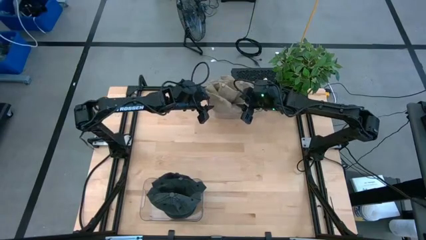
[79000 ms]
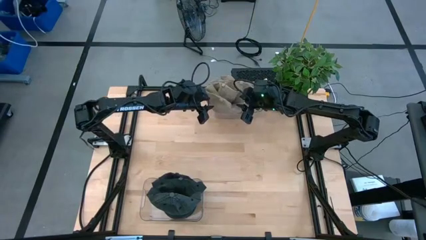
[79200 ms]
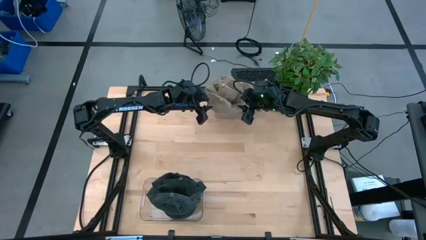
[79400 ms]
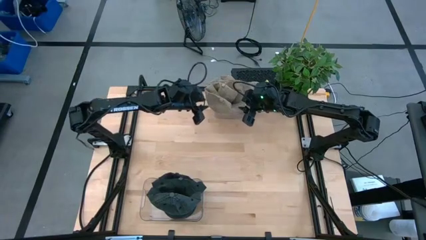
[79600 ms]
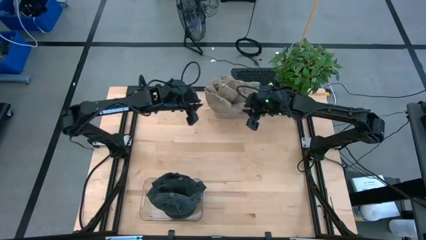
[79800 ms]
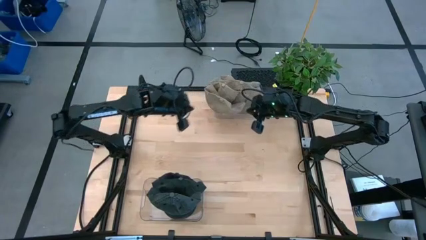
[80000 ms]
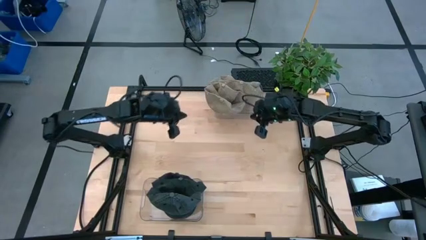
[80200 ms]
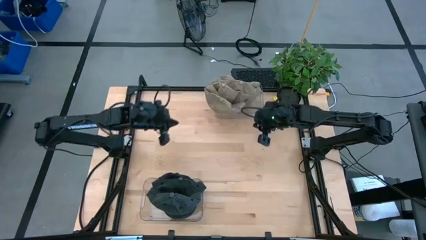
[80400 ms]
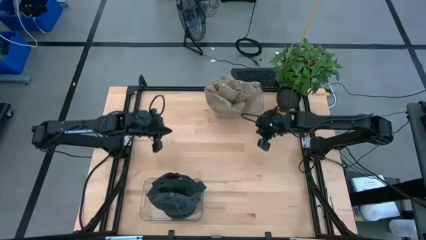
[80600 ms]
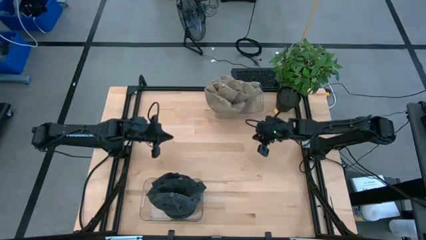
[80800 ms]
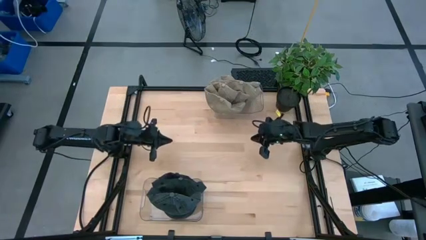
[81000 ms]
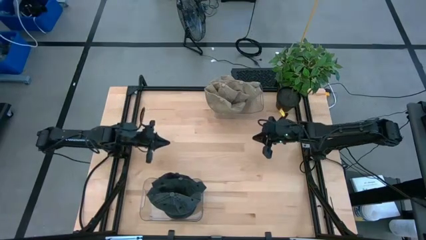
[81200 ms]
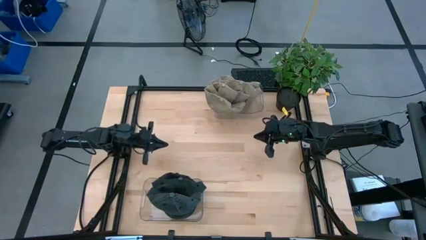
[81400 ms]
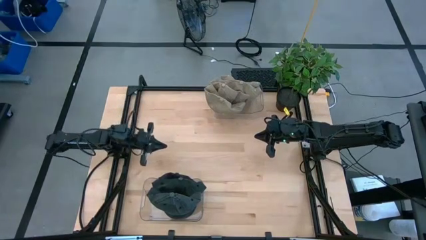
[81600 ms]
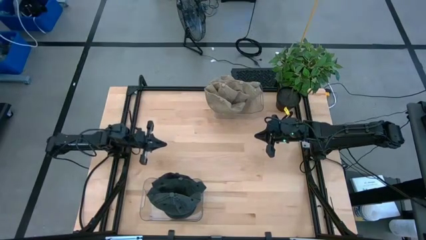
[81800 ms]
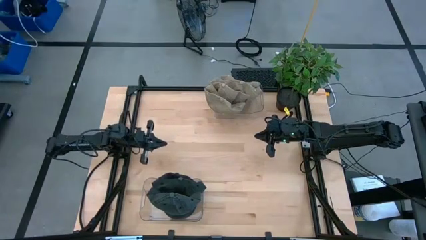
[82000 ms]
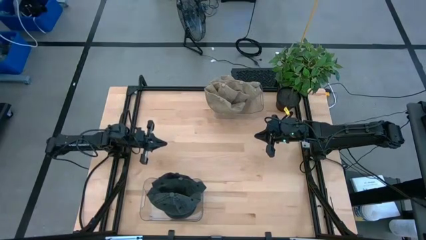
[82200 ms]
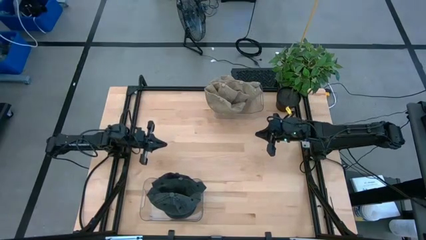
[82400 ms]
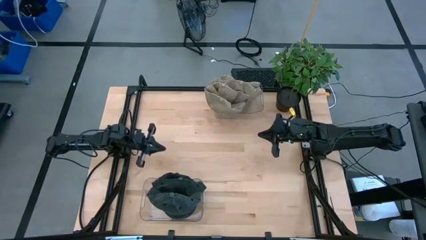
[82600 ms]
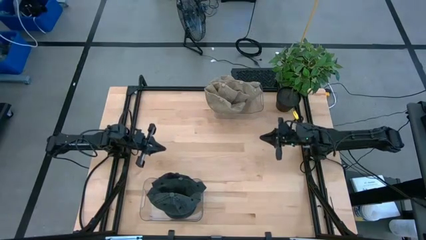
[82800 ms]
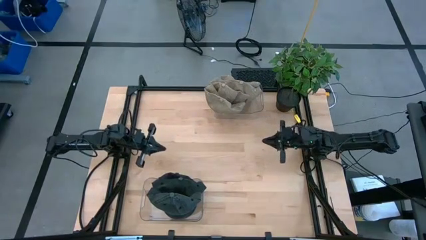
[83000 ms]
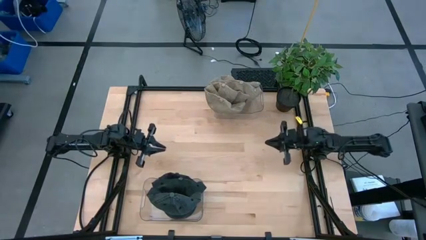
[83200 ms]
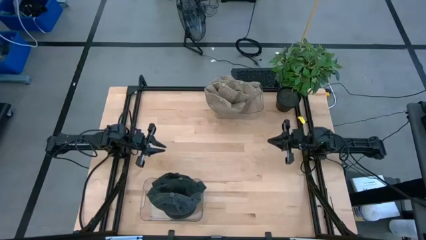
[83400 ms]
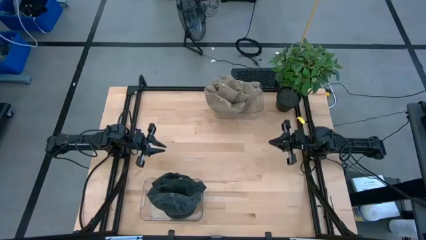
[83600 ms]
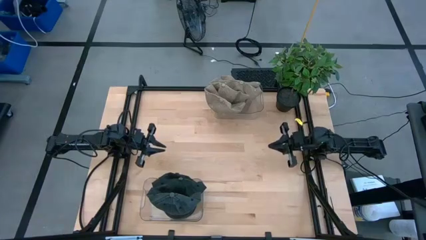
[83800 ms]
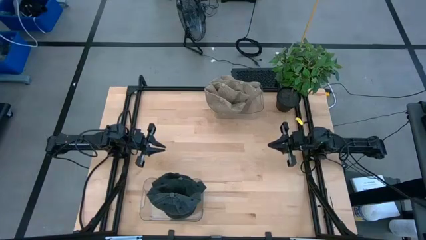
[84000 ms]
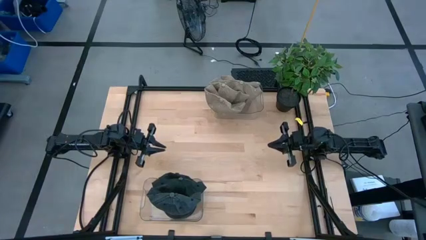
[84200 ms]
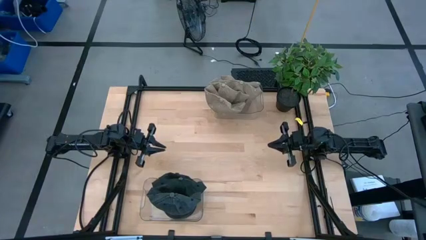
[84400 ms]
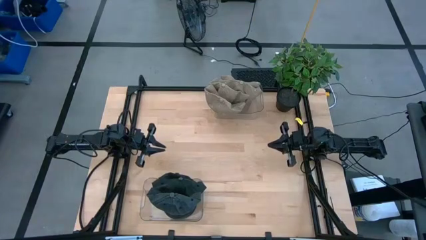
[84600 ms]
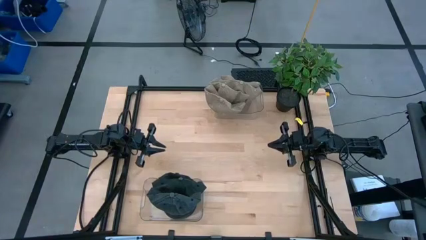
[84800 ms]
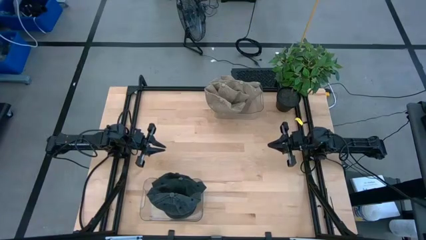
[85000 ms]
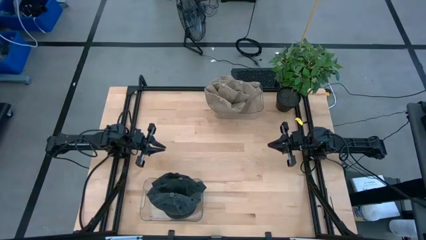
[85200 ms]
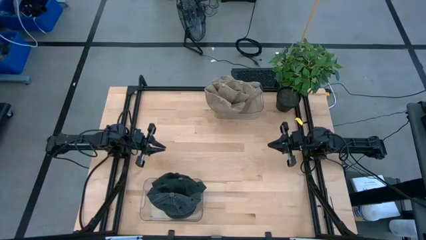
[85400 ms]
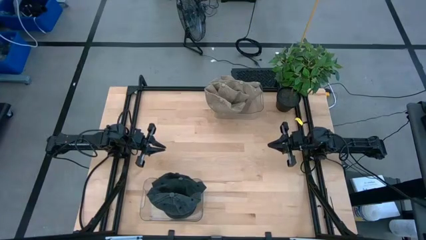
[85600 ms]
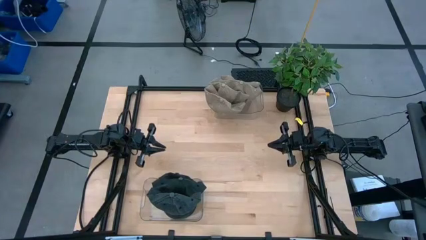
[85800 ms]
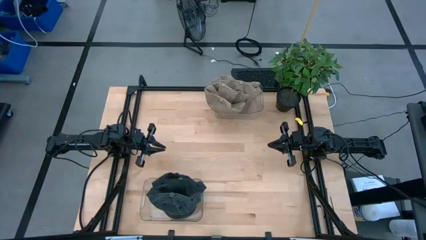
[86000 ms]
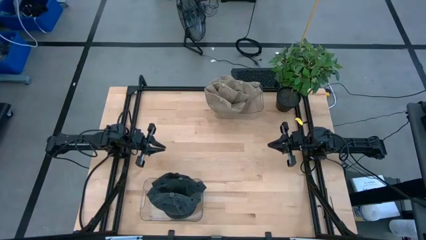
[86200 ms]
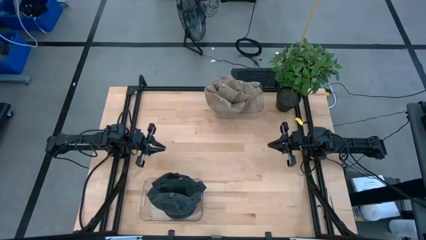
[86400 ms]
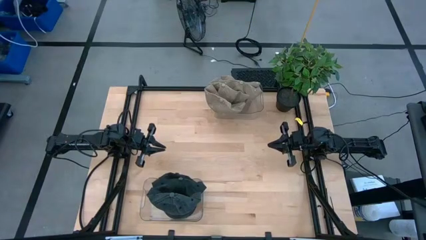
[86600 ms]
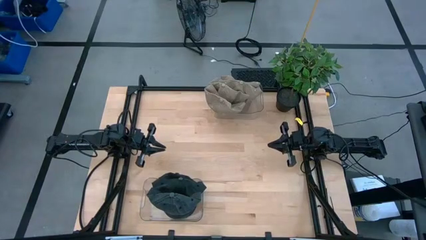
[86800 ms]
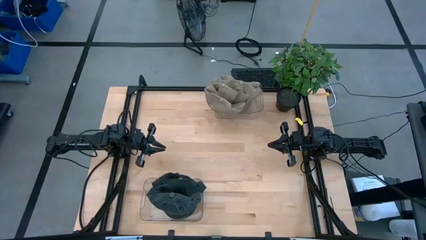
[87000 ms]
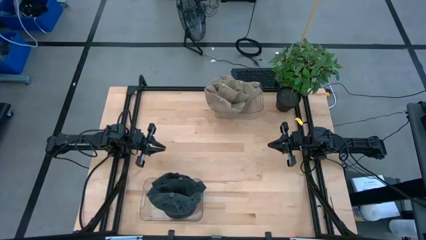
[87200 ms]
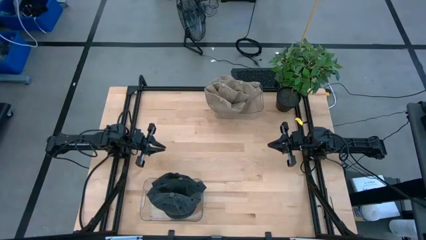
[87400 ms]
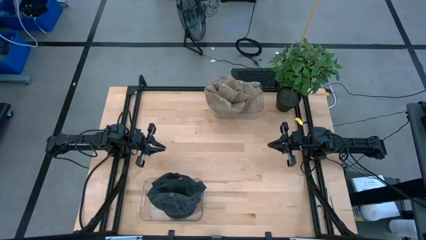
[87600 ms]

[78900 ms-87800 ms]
Task: Pick & Place hat
Return to Home Position

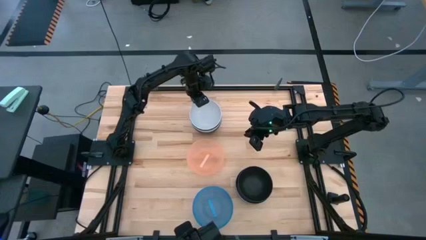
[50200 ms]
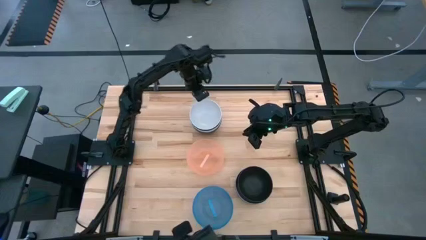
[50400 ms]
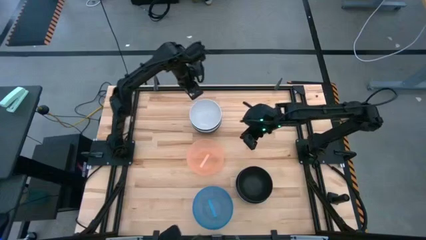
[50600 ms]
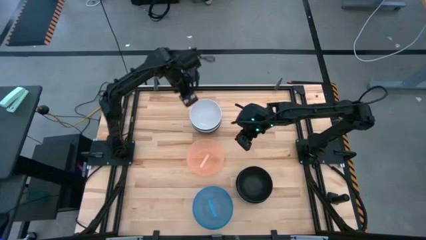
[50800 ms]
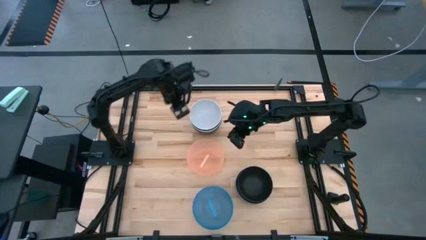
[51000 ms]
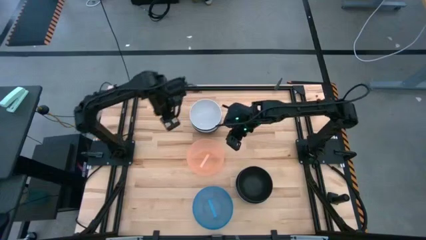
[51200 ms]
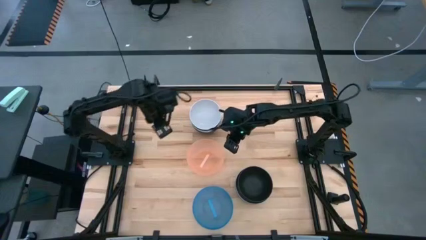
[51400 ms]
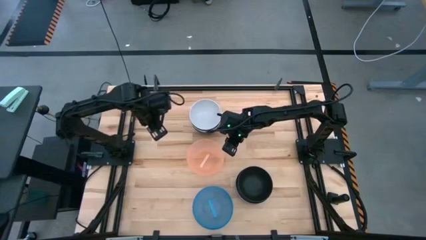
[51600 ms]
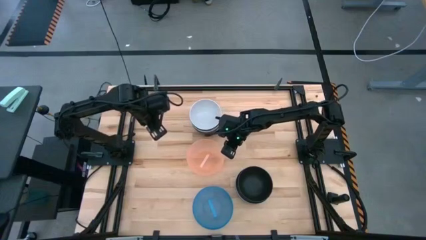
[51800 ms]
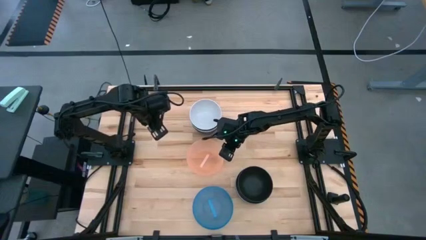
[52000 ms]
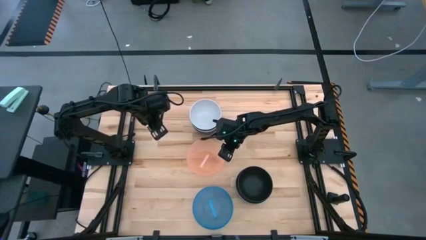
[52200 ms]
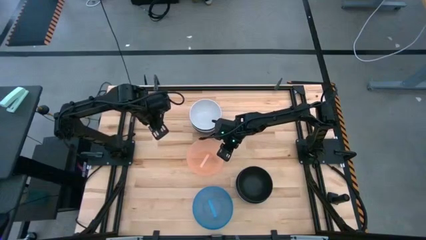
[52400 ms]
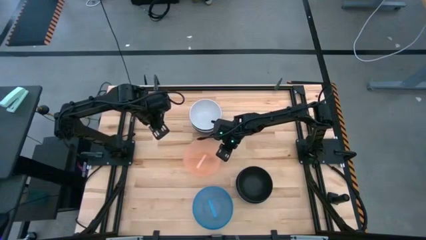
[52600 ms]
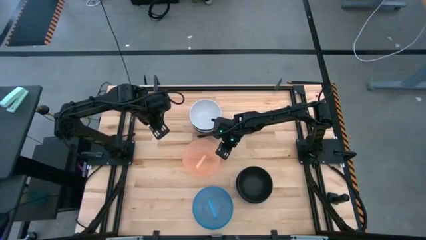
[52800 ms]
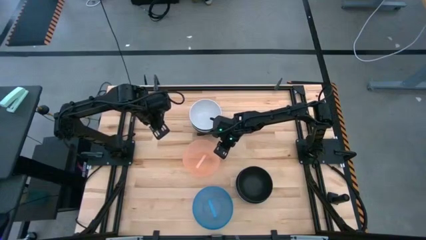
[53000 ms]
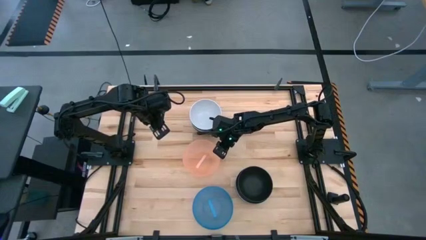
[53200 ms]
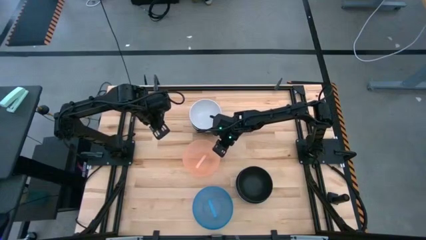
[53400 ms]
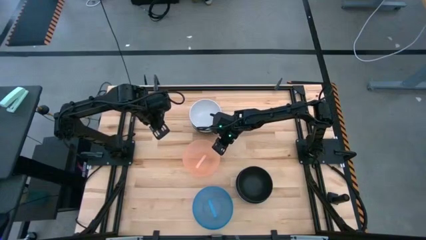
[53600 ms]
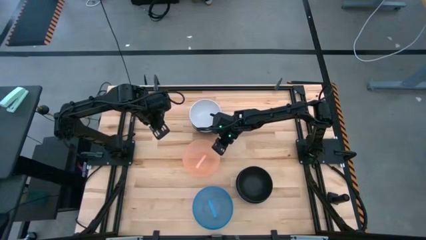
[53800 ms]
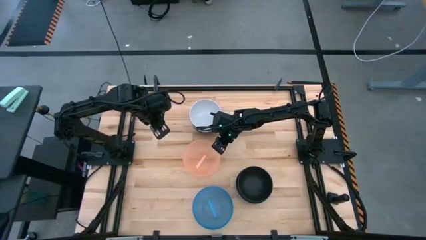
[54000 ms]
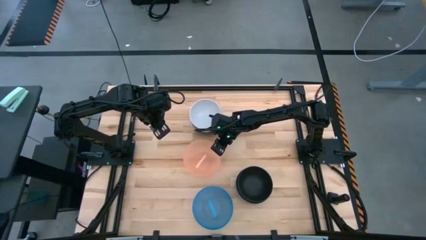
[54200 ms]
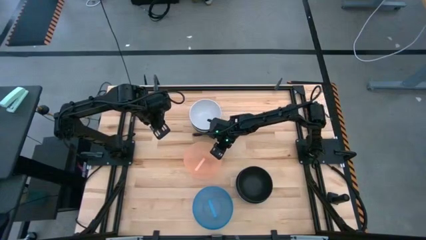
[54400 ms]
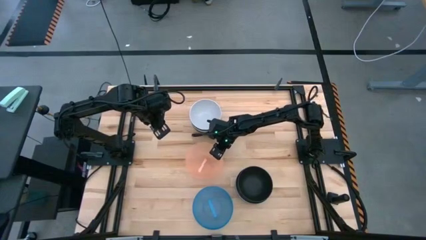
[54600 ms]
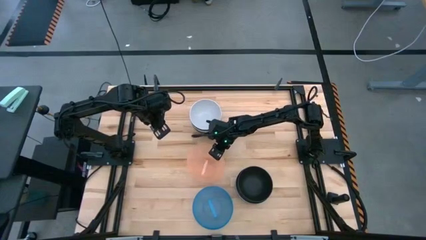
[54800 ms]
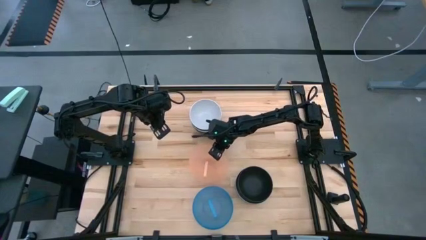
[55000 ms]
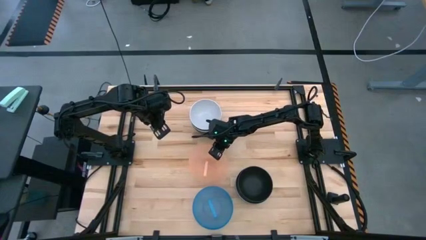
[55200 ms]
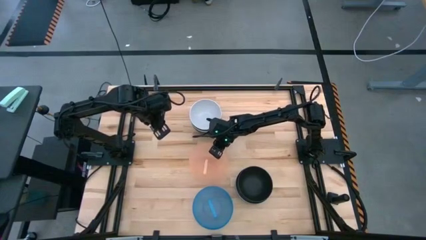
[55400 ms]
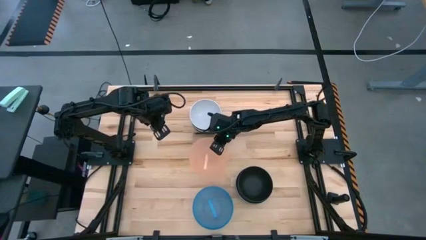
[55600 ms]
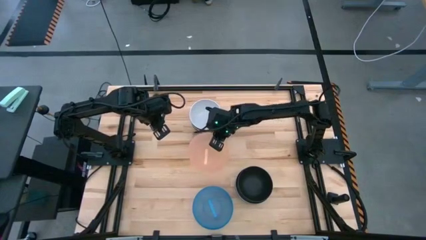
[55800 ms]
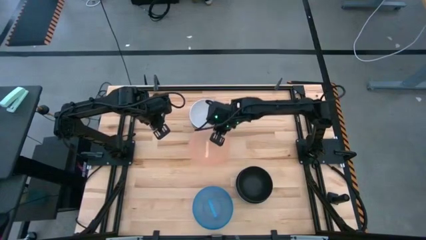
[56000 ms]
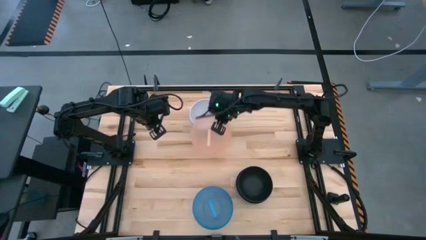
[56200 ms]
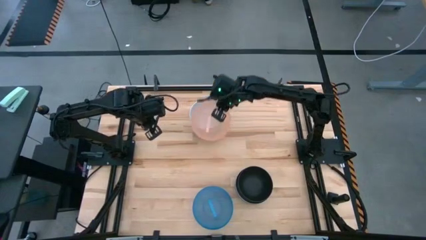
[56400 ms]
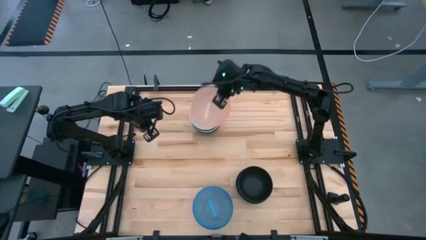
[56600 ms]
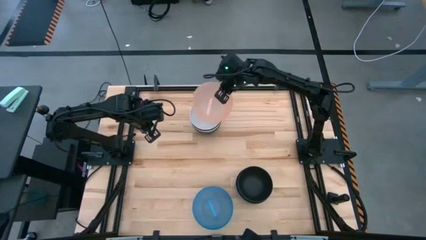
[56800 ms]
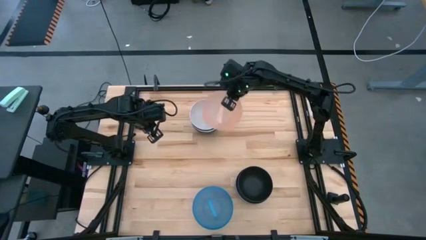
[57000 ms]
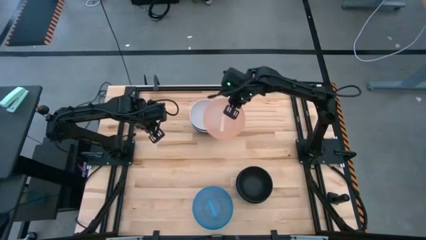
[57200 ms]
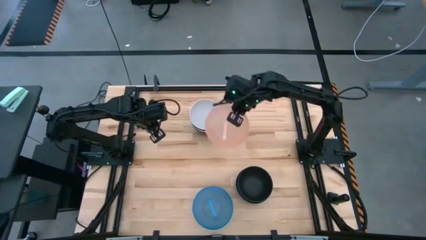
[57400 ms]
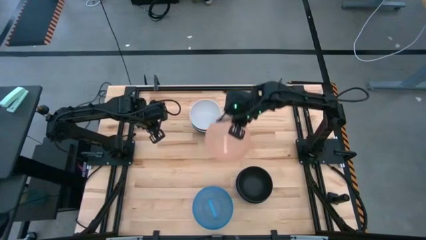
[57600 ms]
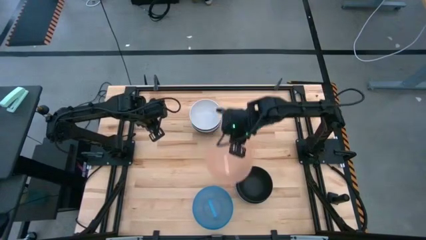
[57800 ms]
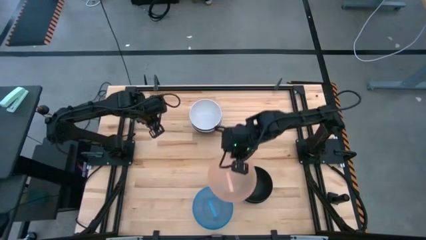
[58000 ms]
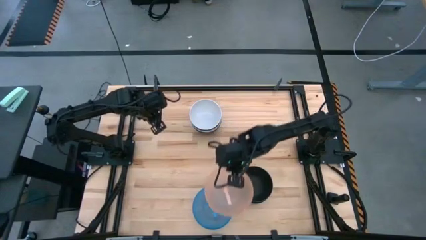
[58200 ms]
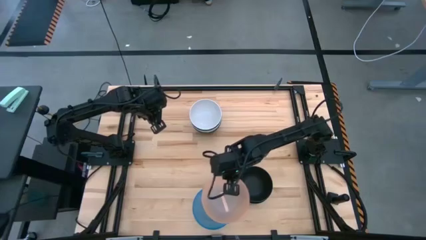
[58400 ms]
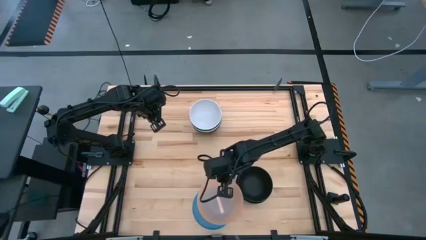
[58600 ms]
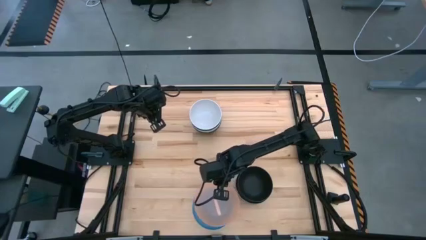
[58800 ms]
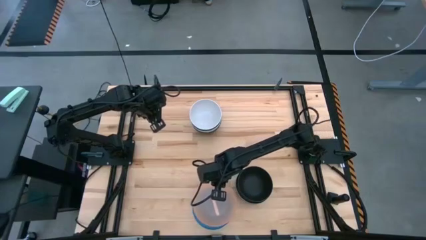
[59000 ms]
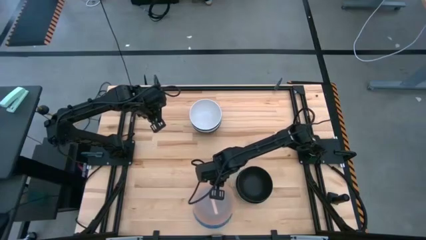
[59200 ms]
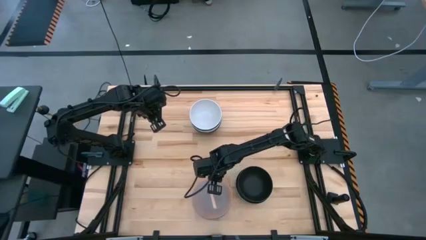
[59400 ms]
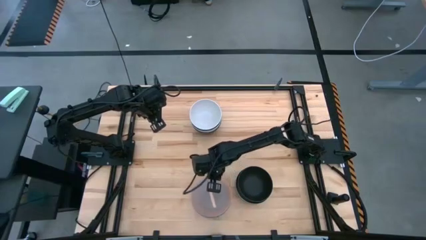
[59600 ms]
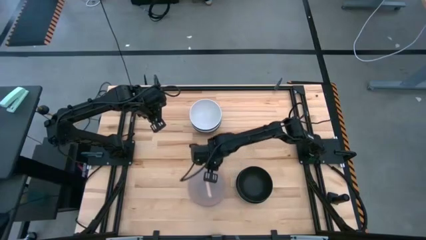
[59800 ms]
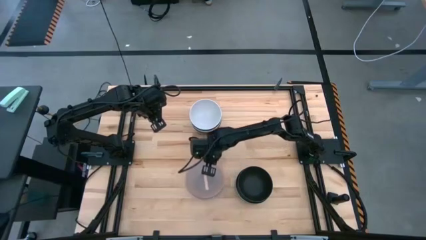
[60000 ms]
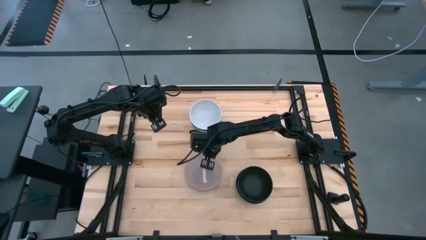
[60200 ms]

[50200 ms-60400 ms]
Task: Nest bowls inside each other
Stack the orange bowl on top of the blue bowl
